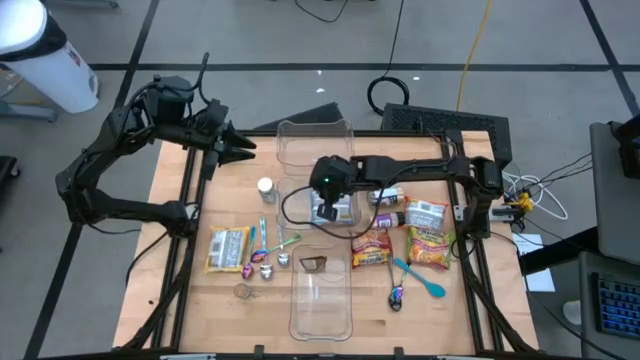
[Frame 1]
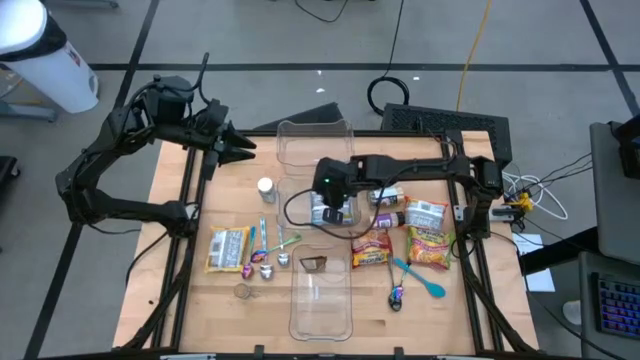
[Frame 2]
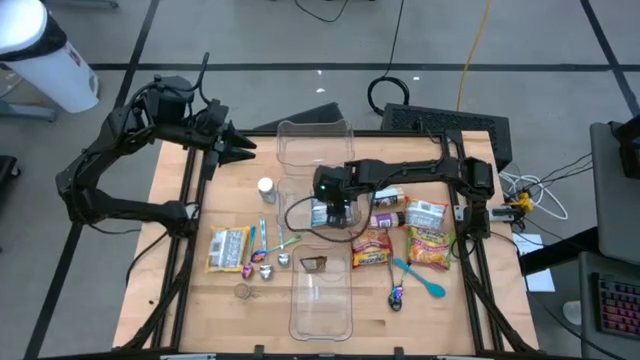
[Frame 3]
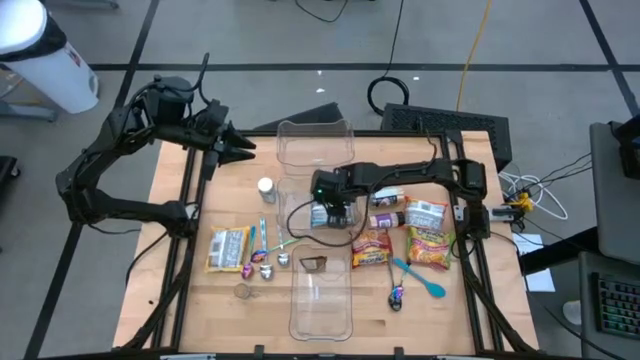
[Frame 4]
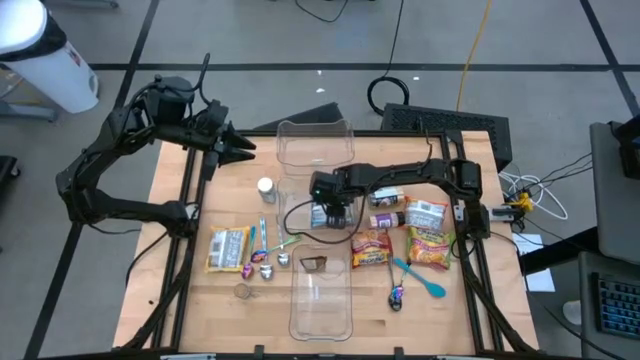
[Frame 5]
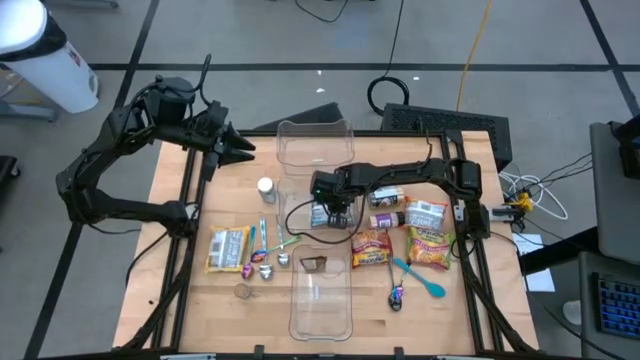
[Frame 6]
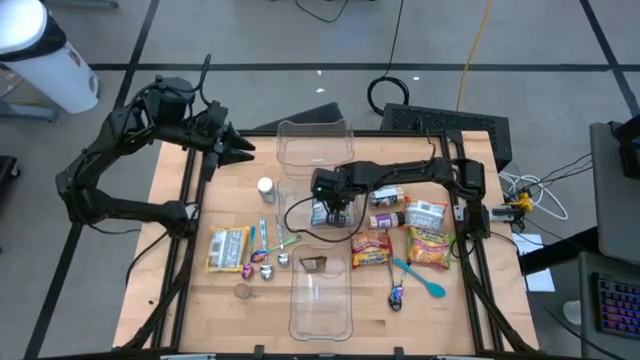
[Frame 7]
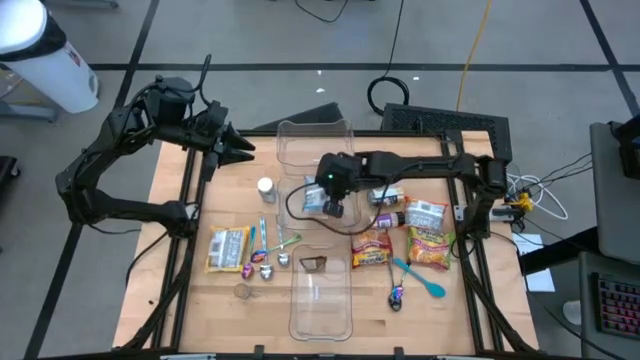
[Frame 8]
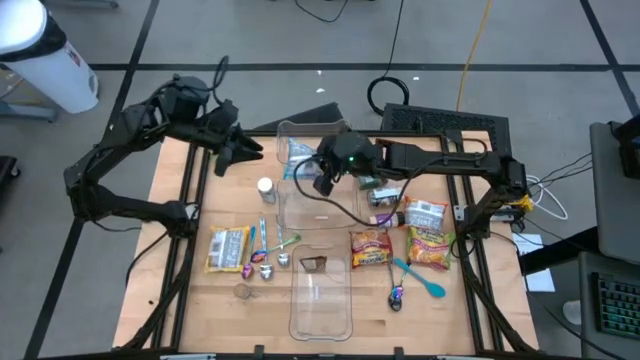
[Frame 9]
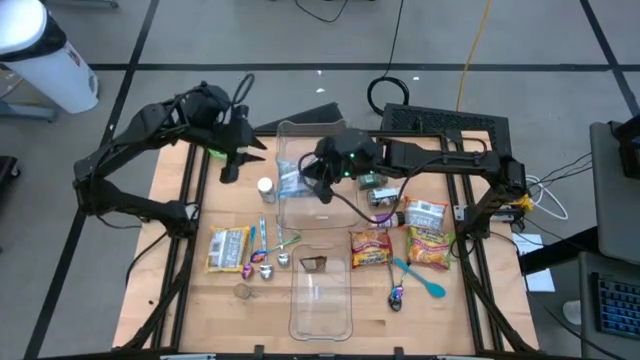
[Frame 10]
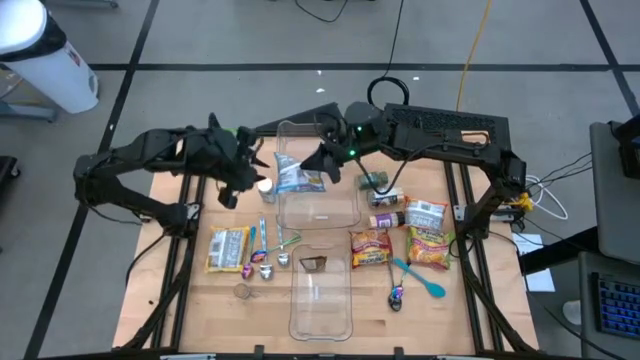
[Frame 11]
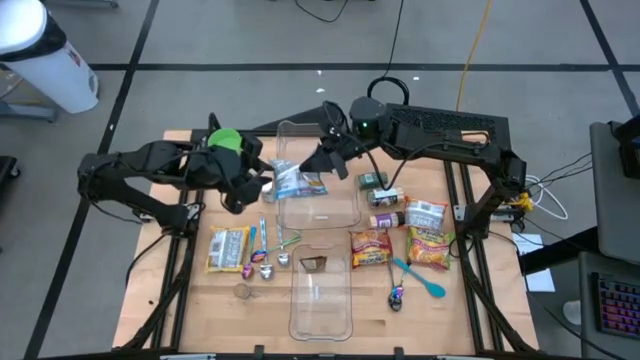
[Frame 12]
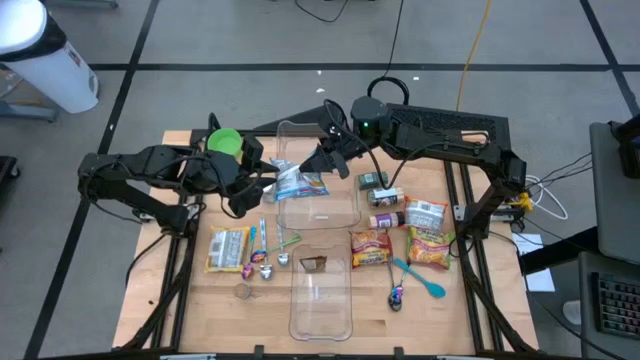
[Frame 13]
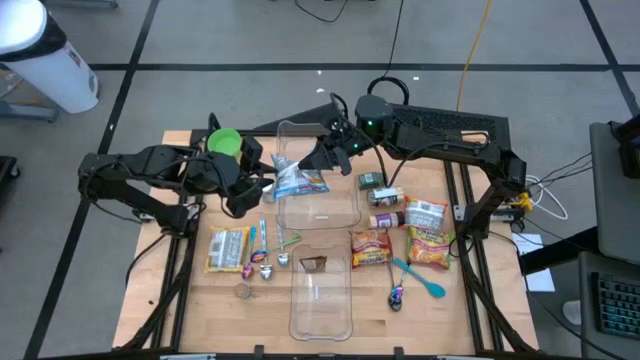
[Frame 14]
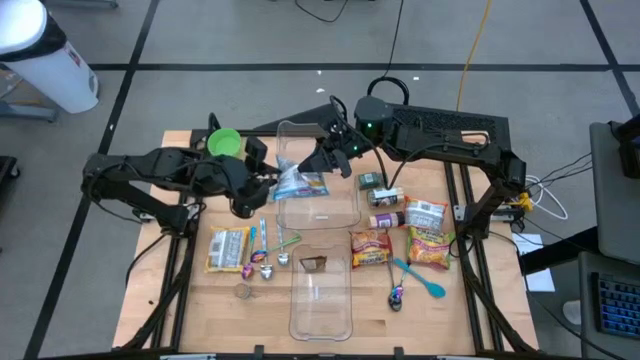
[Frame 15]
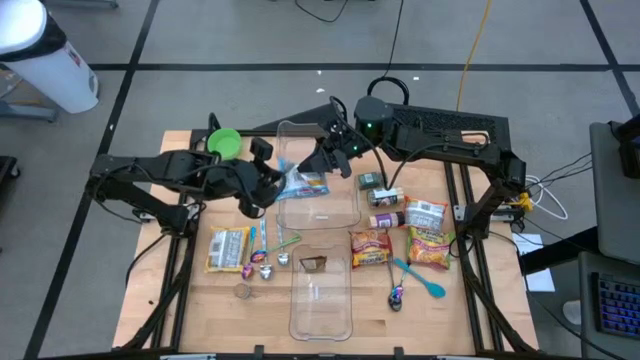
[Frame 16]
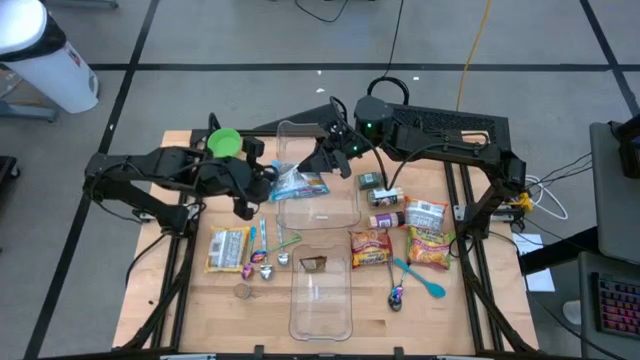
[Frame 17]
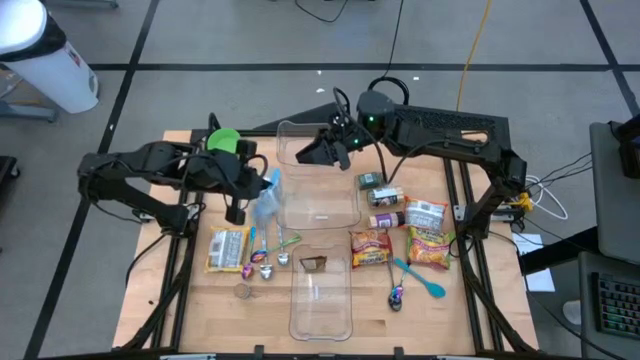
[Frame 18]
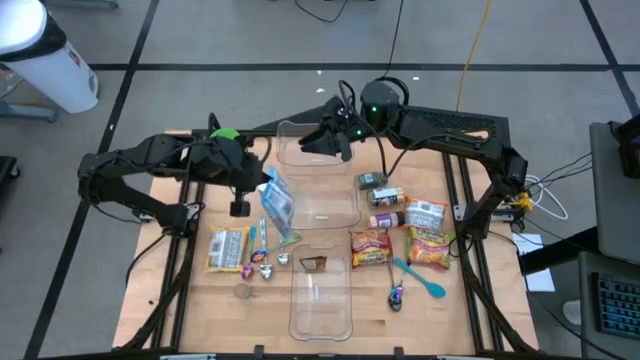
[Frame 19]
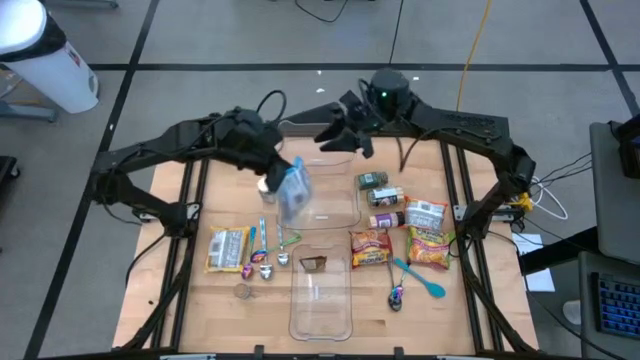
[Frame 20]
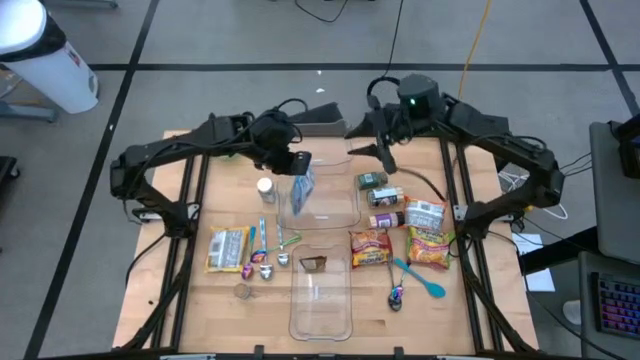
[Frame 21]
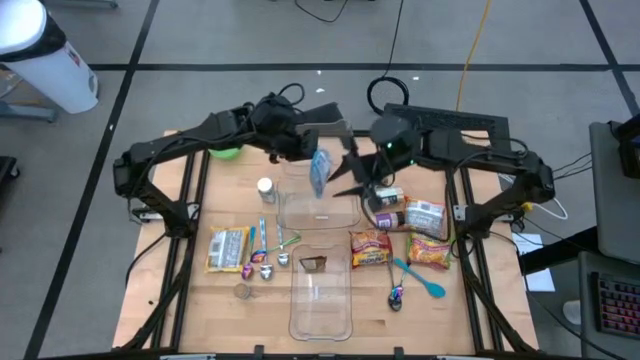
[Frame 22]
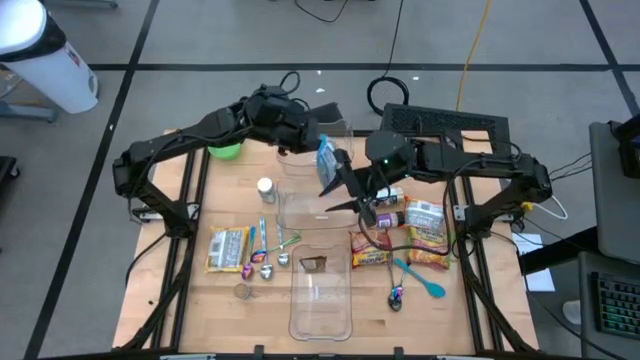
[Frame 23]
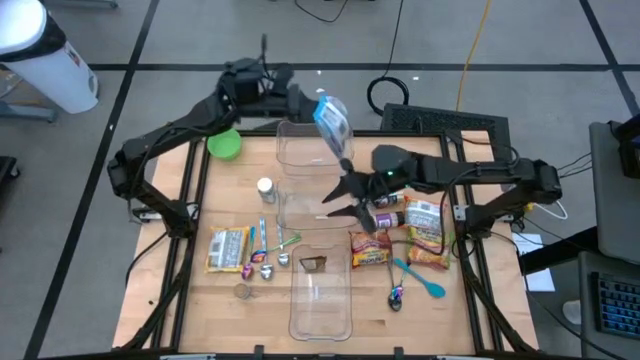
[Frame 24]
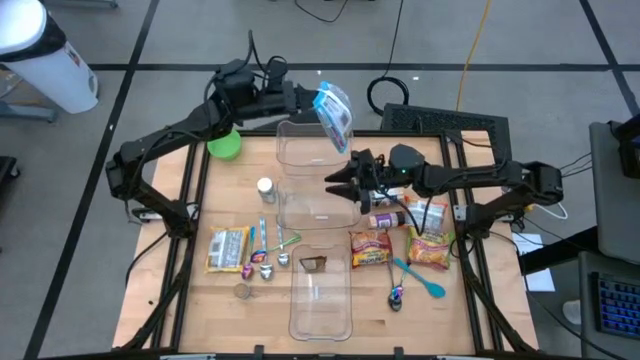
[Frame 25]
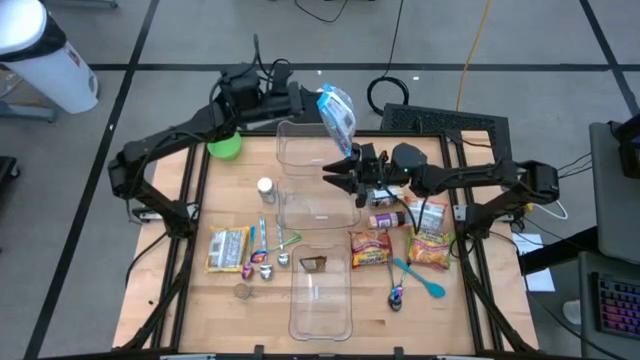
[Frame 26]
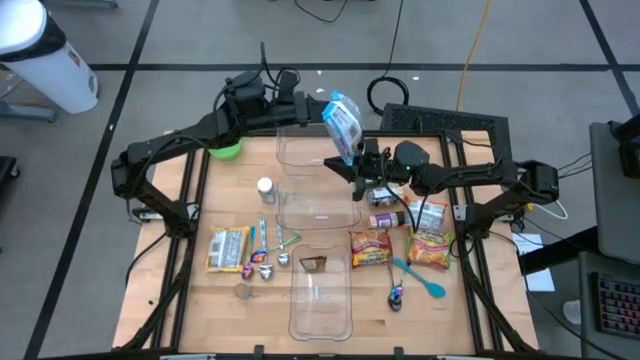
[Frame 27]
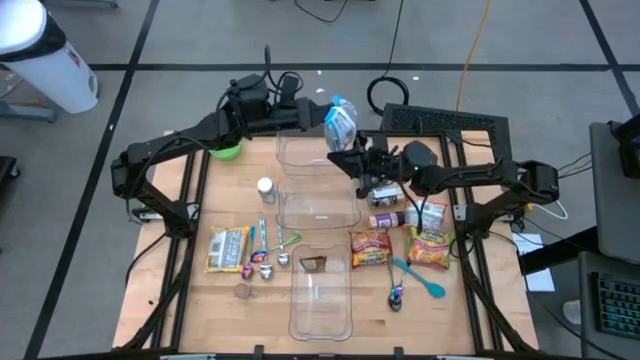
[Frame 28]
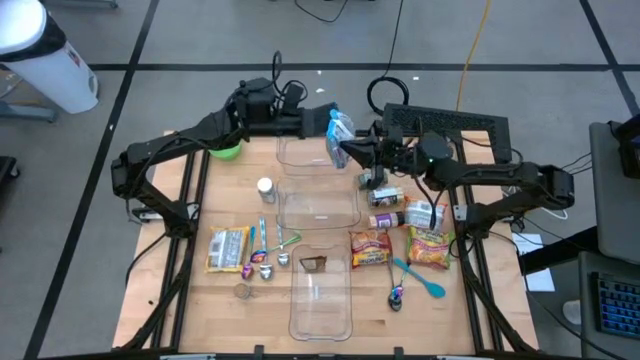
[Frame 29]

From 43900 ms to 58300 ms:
Task: Pick & Place Food Item
Put the blue noodle pack into the middle transparent bin

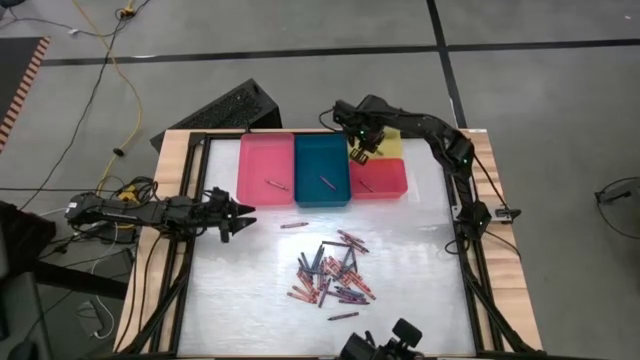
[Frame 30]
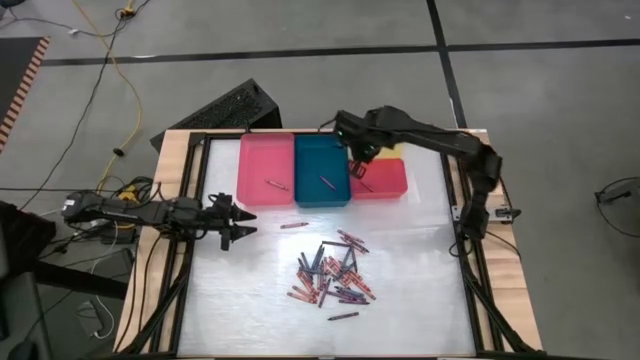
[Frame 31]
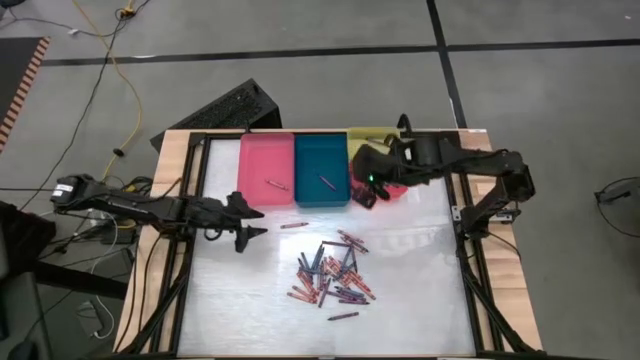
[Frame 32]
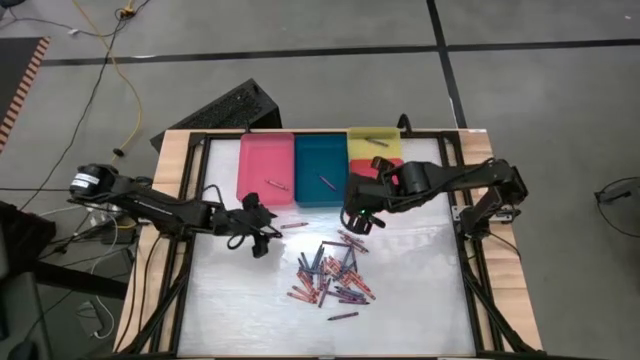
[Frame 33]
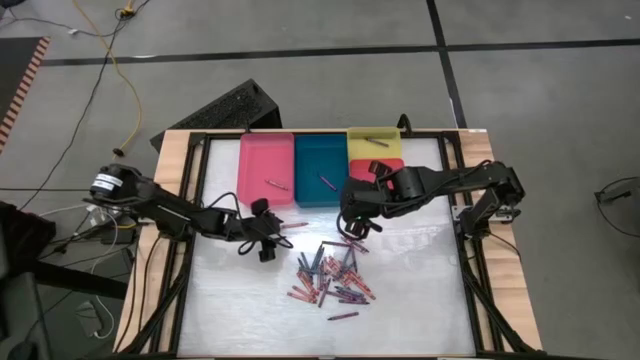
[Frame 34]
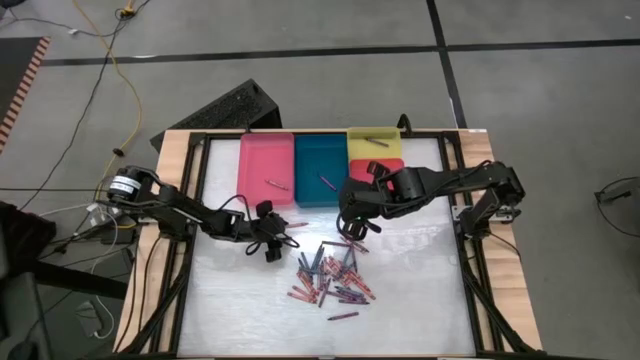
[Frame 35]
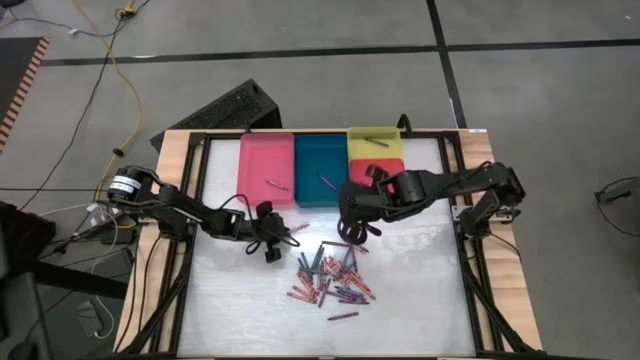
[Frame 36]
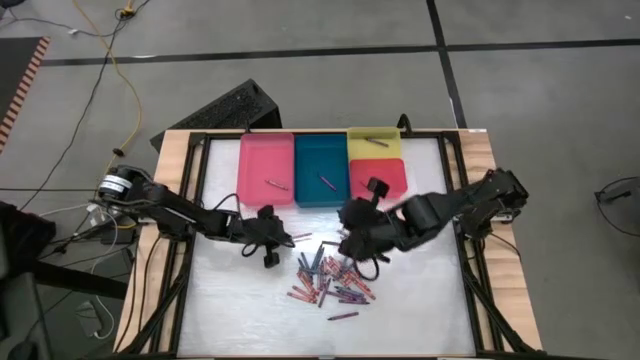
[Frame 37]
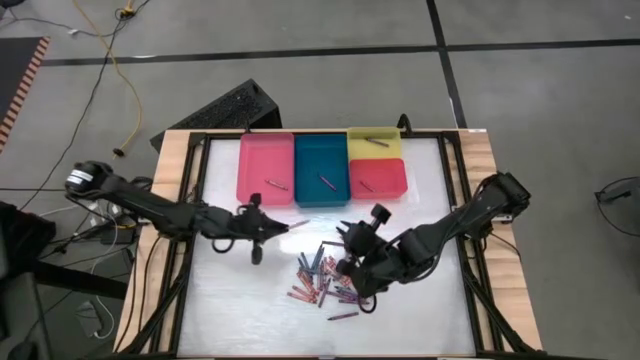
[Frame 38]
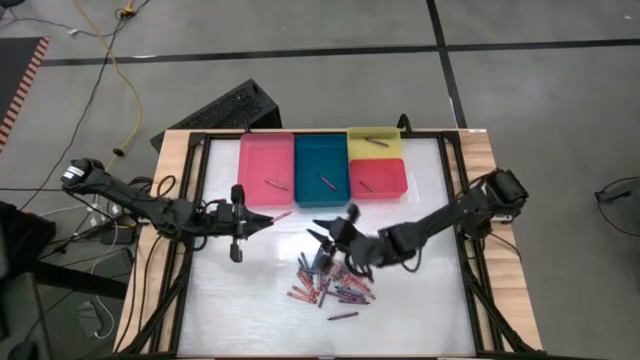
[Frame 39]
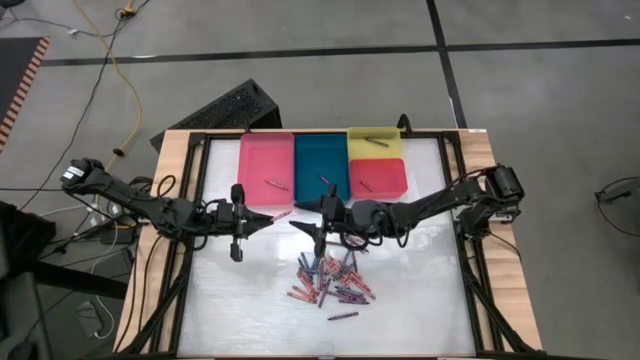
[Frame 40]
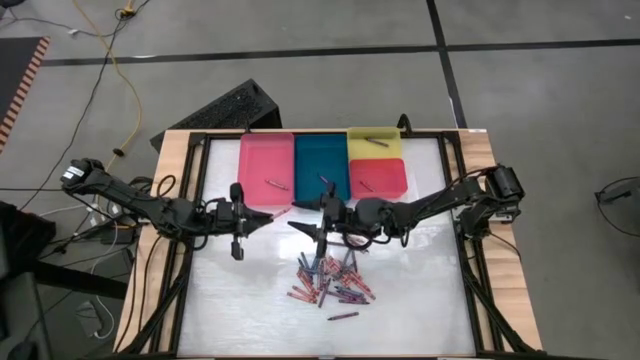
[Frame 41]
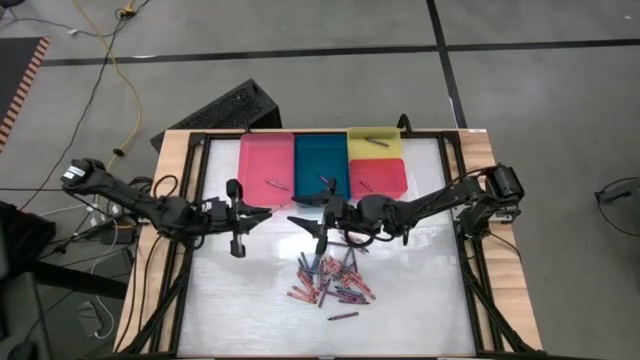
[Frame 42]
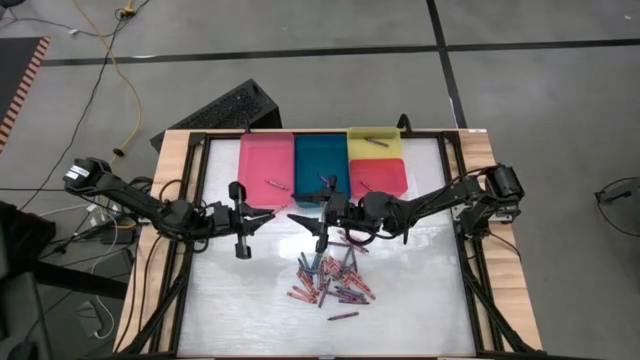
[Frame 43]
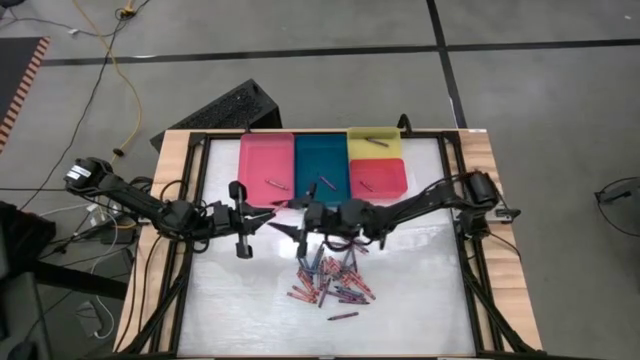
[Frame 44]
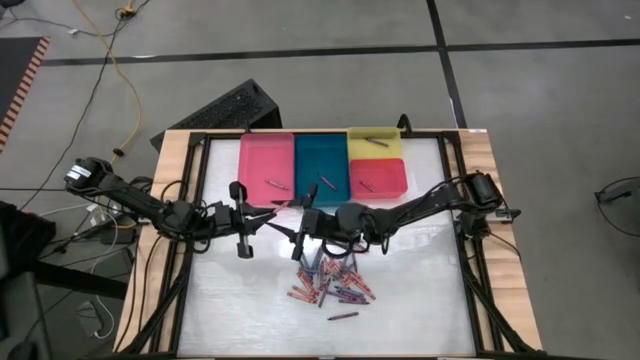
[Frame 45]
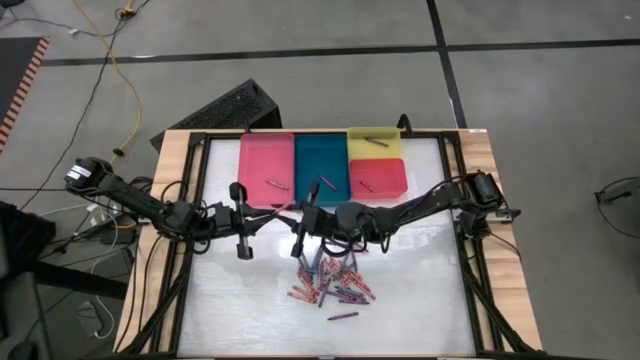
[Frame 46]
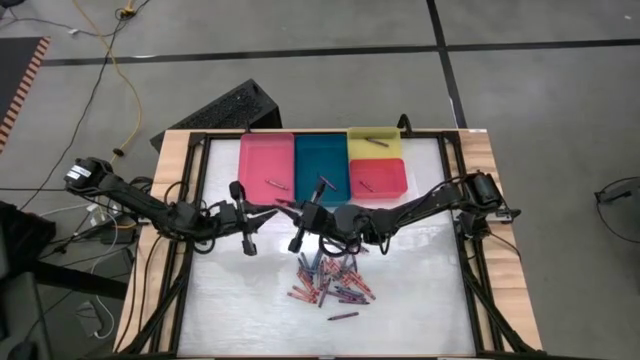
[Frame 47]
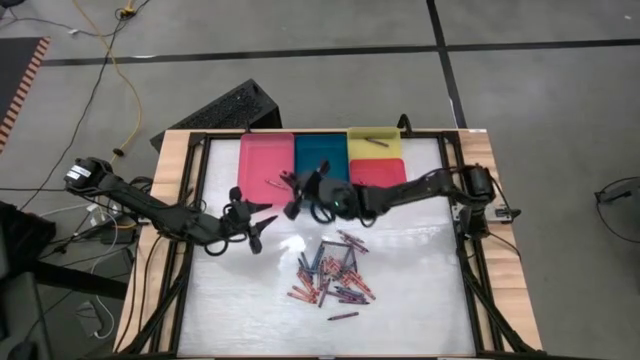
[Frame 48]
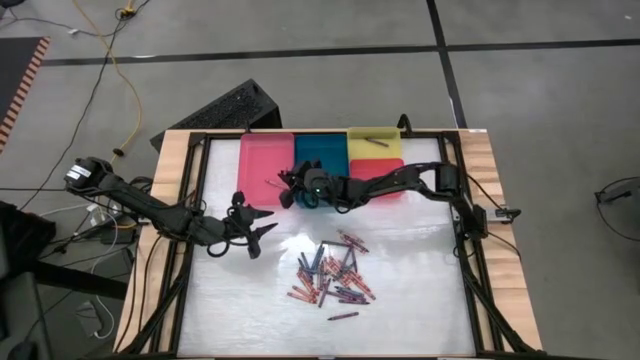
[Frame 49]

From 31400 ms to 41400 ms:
Task: Sort crayons
Put the pink crayon into the pink bin
